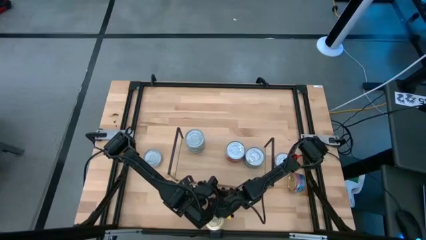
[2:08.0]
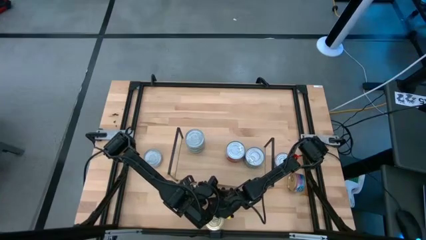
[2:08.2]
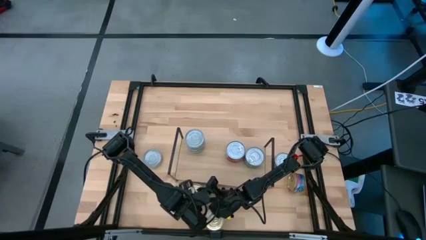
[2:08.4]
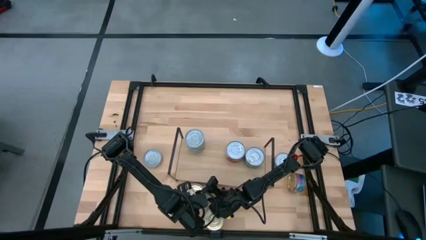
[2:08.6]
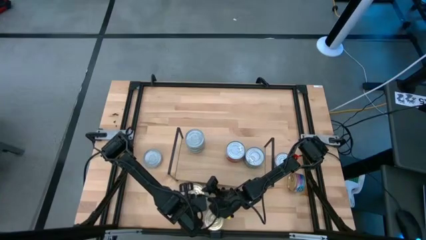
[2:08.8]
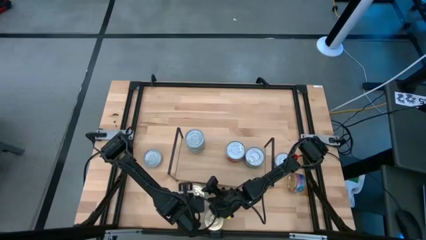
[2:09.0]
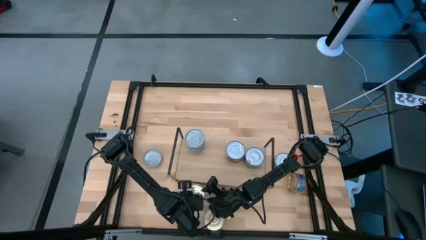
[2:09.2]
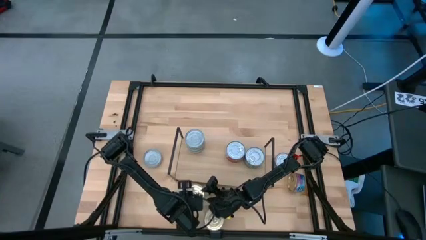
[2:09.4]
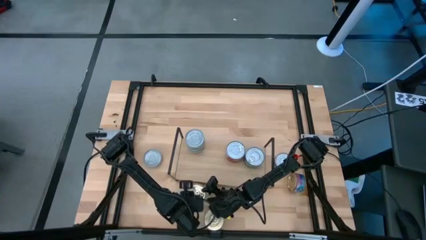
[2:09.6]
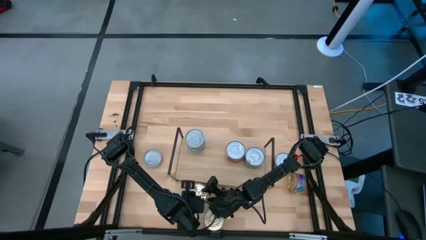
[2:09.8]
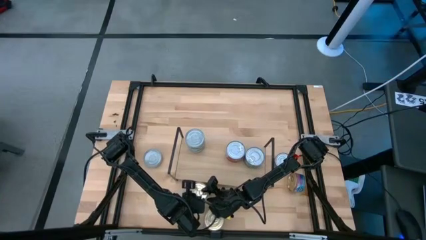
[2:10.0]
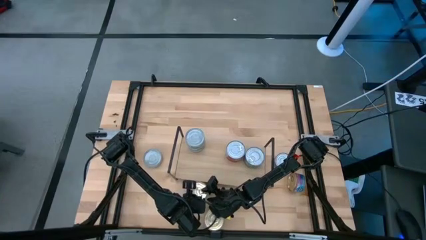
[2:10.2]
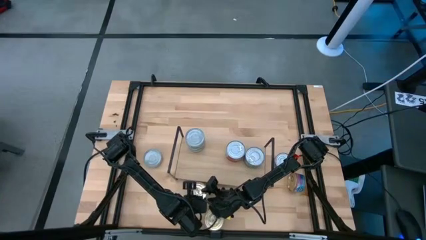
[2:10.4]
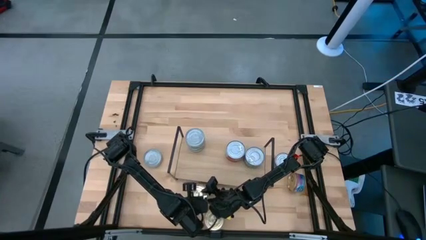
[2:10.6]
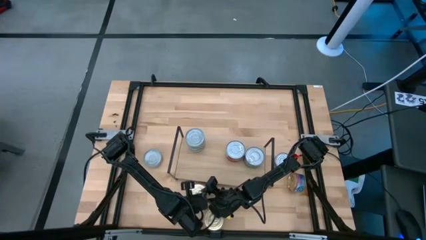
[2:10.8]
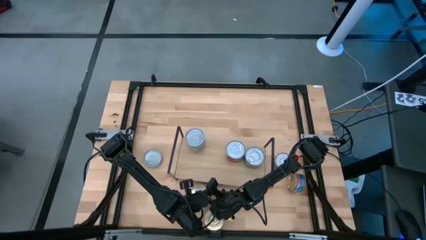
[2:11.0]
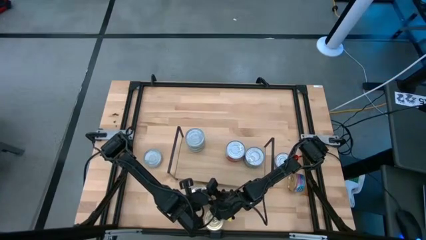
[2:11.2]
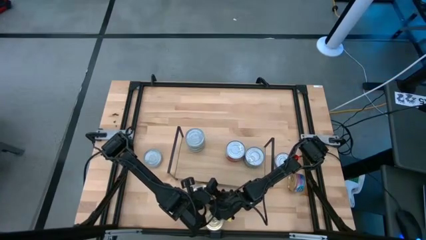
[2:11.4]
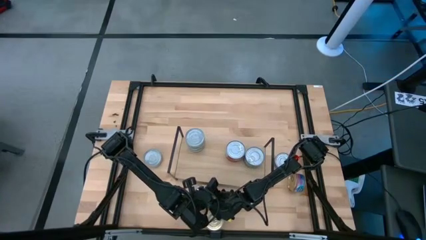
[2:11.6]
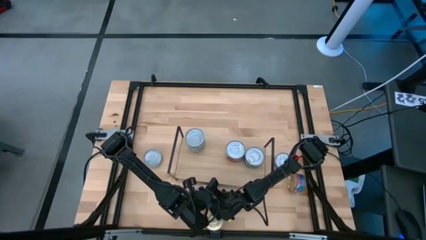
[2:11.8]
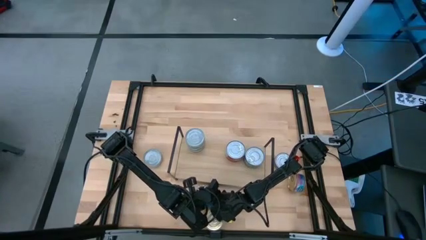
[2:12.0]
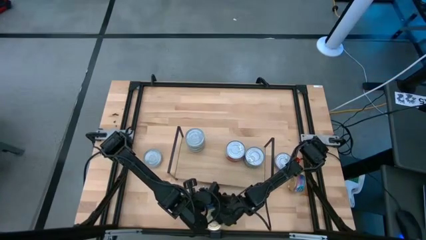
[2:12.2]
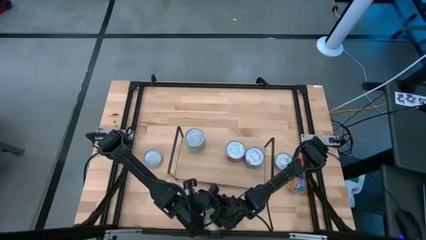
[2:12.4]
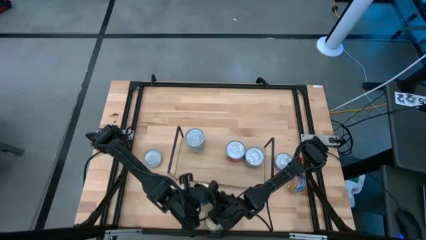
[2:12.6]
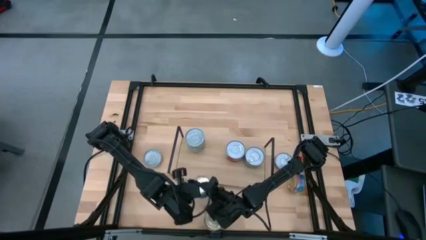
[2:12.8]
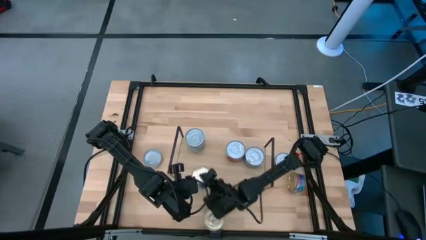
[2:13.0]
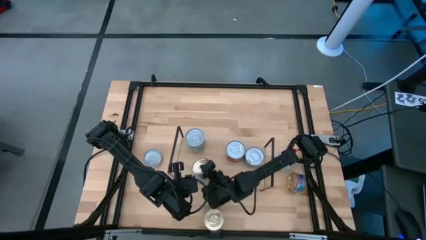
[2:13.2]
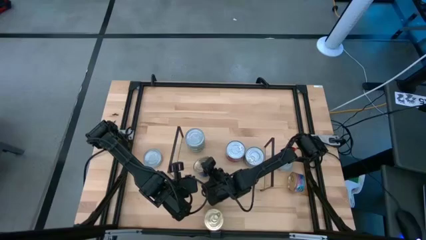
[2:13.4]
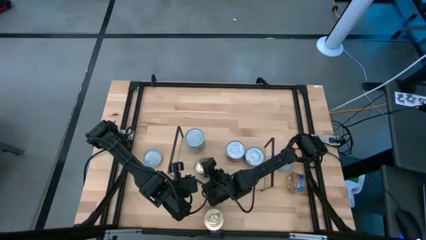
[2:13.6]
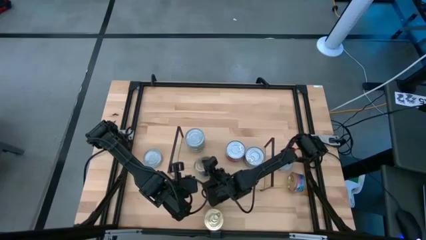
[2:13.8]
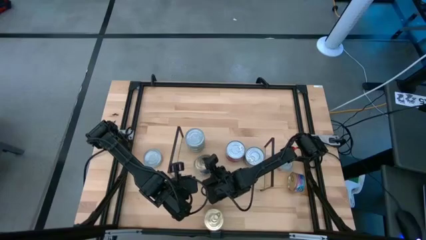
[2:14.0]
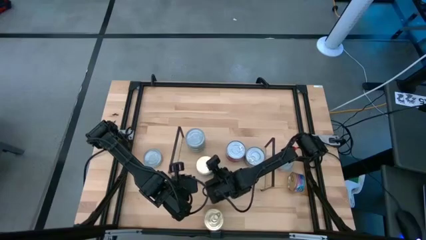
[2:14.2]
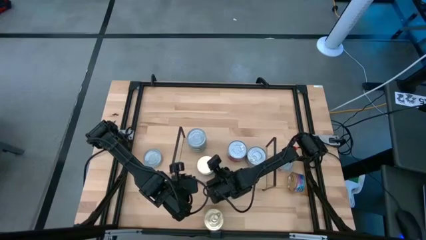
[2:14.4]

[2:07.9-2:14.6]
Task: Stack canned seafood by type on shelf
Put the blue pink tuna can on the shelf

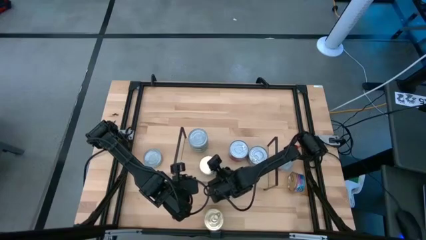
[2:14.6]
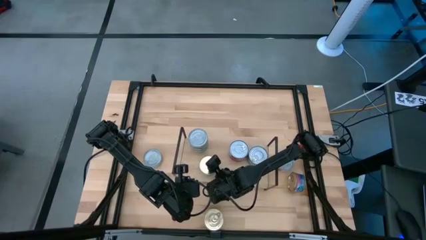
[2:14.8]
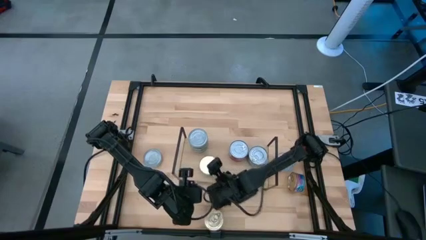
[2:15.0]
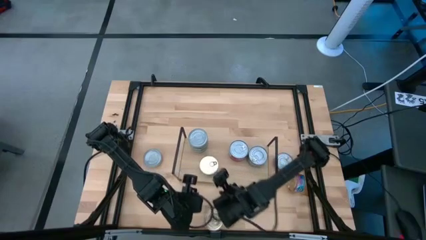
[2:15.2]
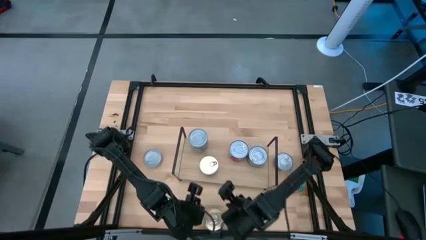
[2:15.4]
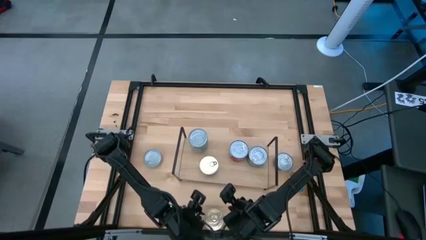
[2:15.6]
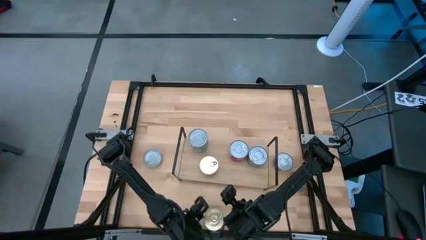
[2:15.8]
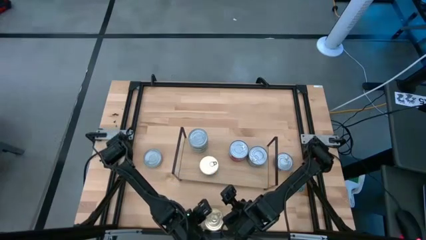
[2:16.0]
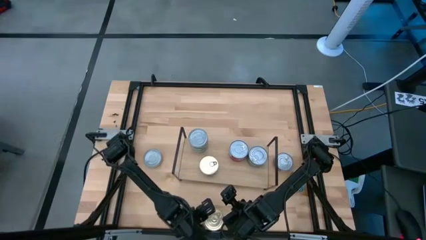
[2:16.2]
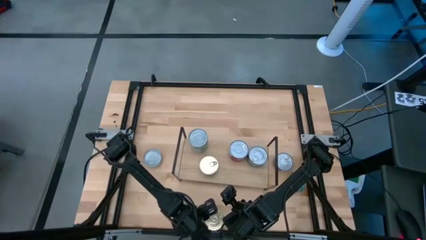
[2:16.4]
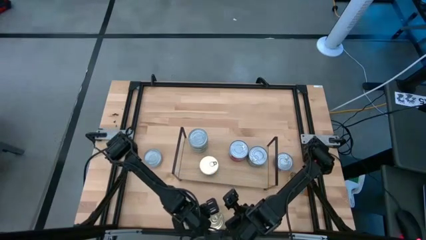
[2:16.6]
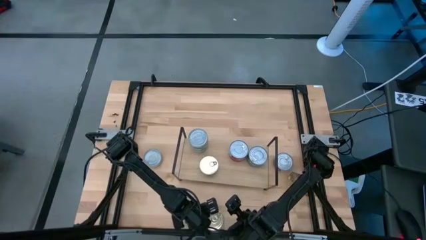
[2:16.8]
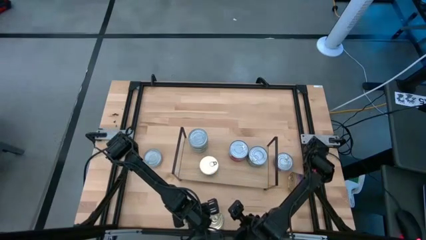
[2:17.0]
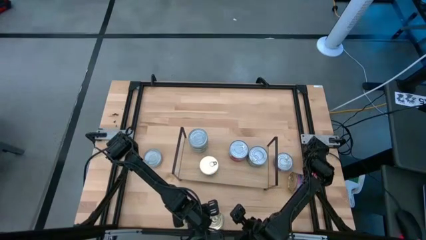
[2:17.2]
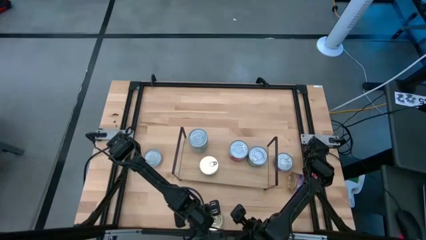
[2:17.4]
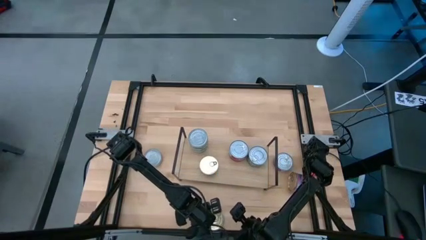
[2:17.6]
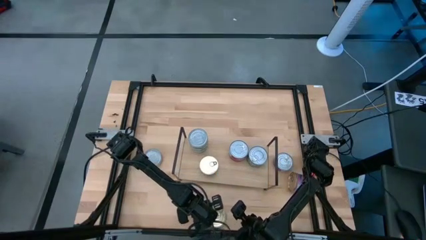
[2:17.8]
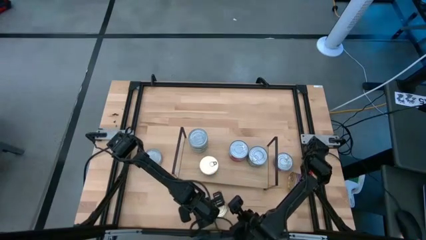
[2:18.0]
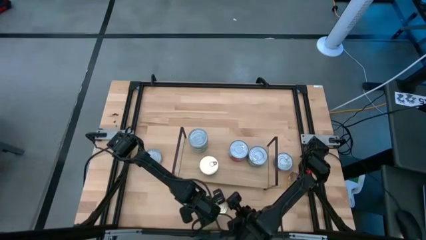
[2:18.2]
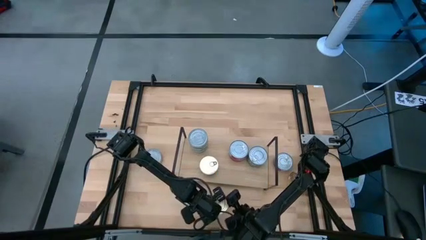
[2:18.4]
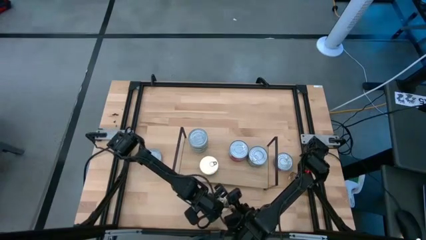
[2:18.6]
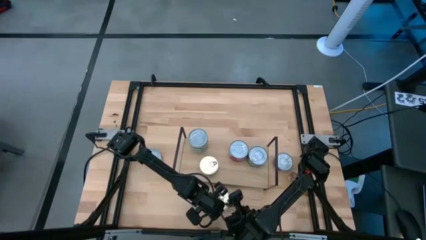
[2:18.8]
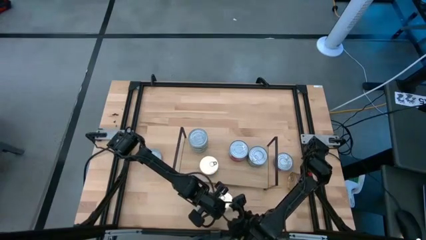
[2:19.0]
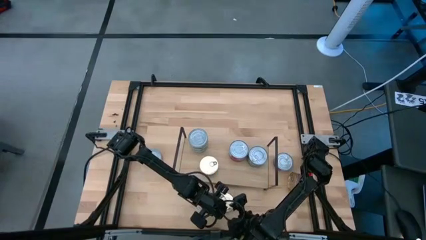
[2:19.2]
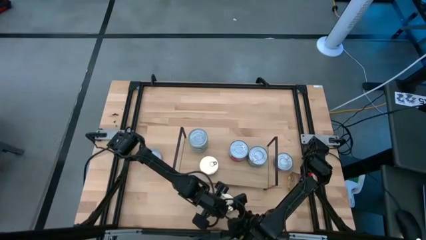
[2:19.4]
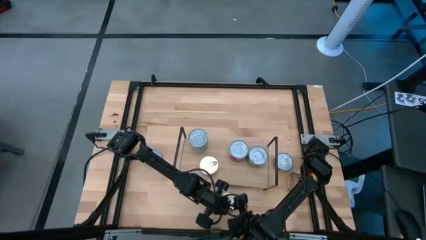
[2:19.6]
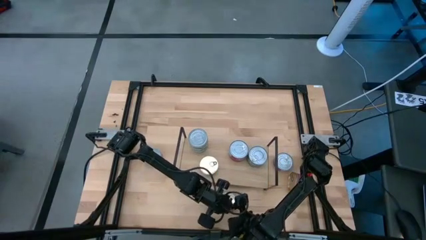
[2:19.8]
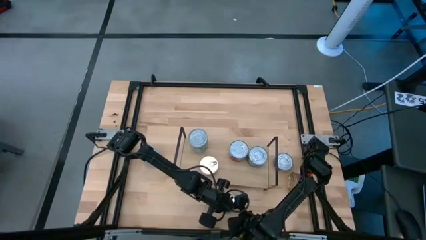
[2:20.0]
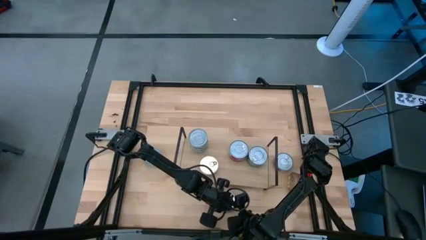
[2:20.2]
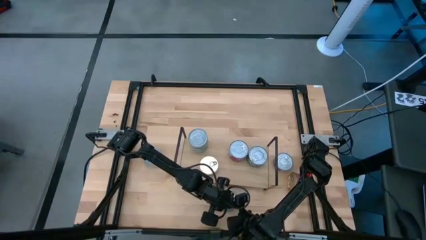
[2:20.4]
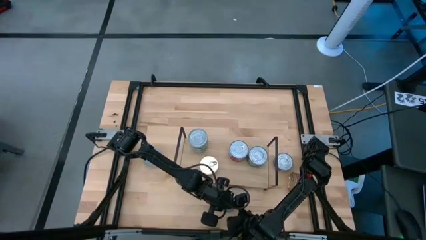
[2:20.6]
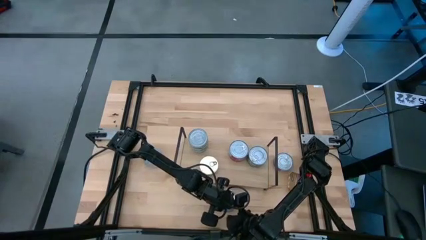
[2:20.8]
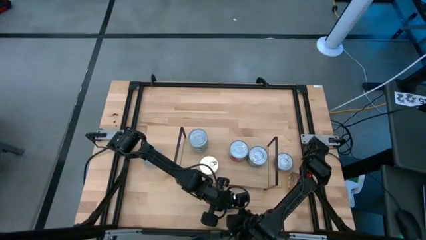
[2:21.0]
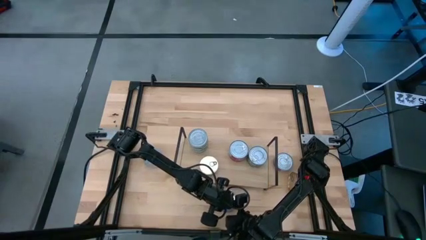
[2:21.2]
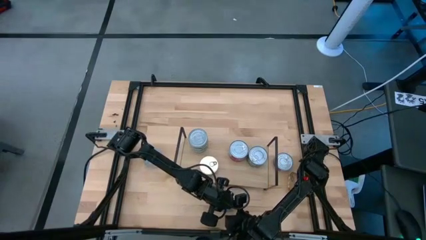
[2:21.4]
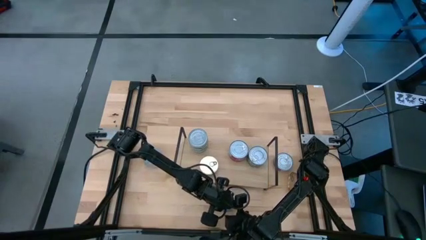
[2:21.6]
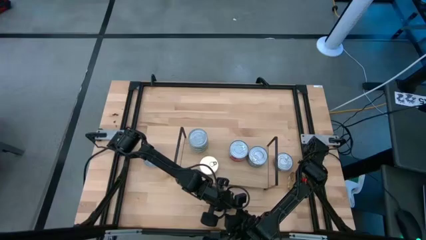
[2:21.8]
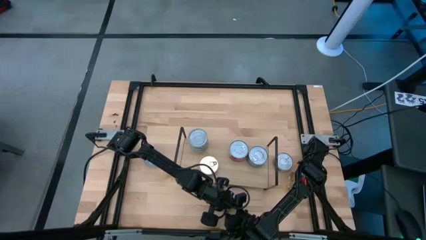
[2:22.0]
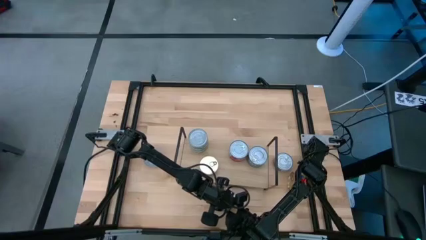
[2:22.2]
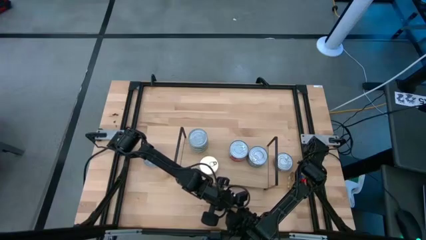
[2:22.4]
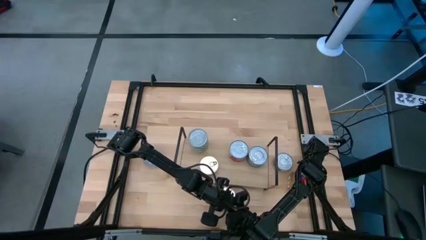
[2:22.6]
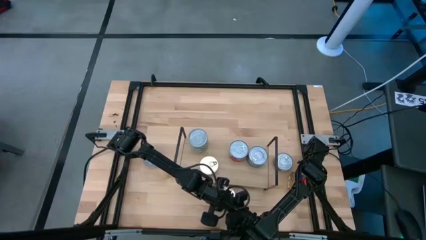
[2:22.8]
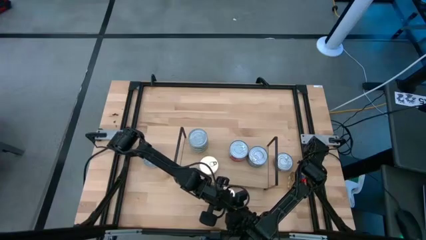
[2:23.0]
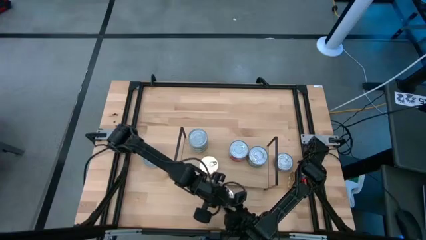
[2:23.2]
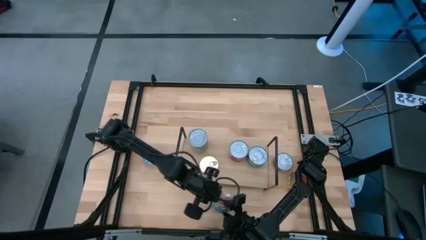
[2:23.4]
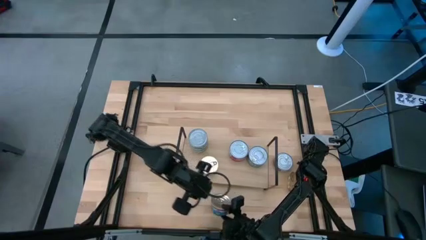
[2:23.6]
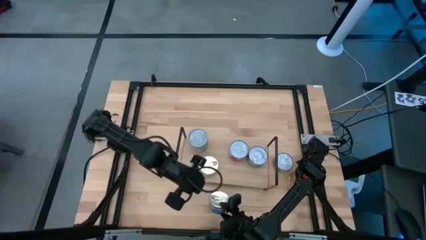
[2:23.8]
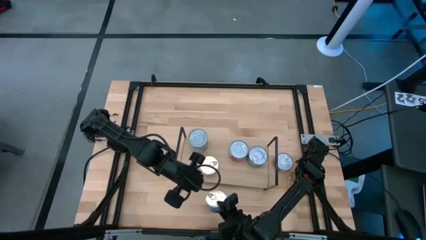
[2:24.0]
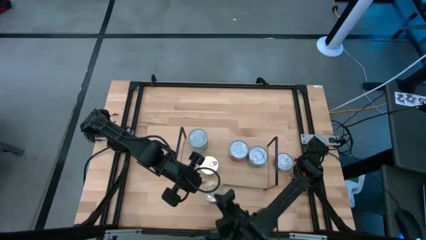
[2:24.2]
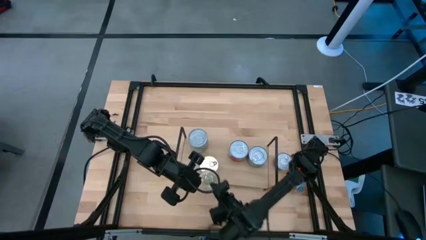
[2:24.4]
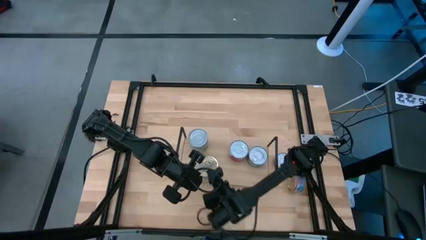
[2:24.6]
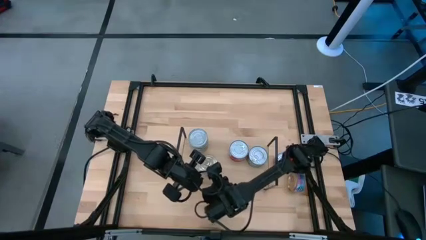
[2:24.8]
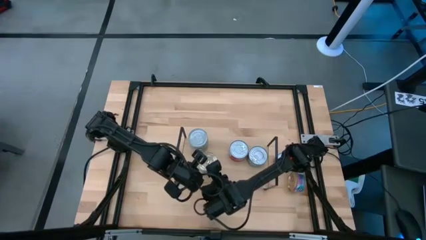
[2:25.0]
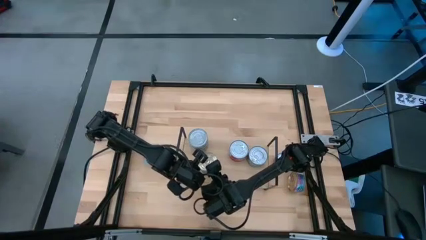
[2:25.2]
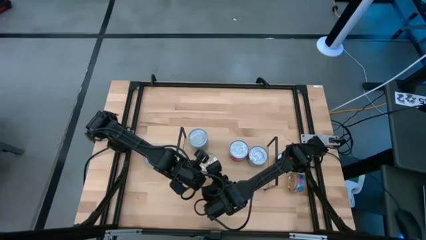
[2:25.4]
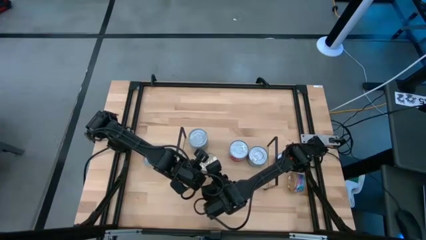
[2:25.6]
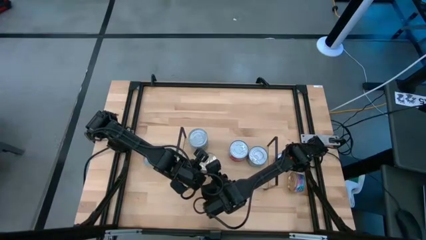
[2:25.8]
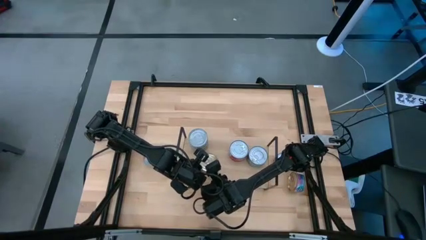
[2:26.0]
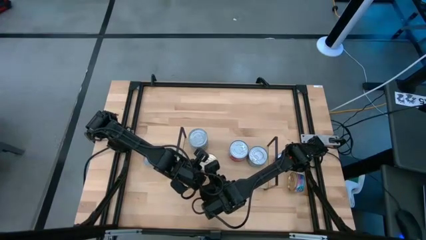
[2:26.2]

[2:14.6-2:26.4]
Stack the blue pink tuna can on top of the blue pink tuna can on the shelf
